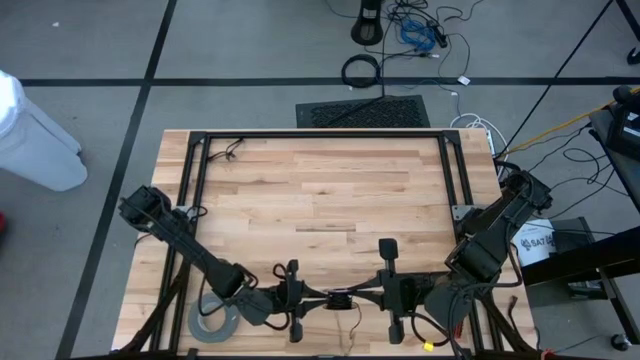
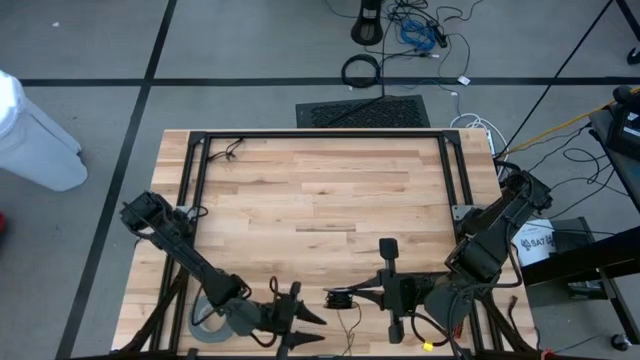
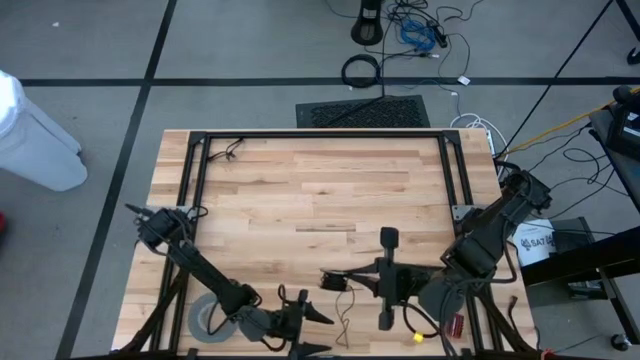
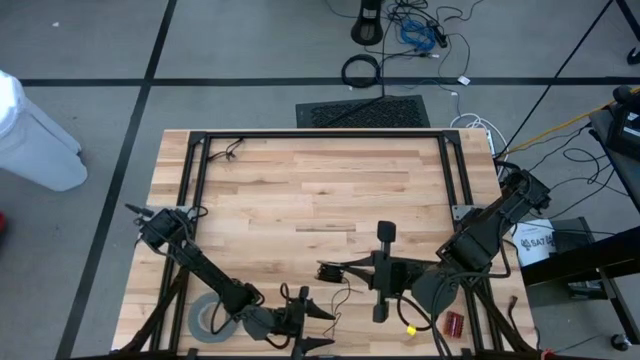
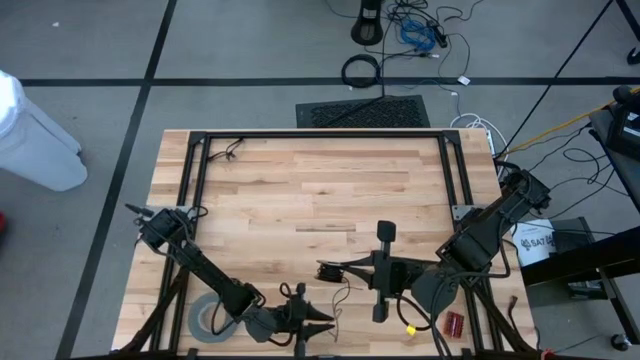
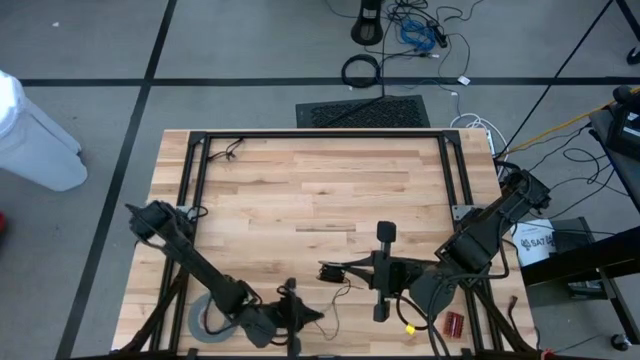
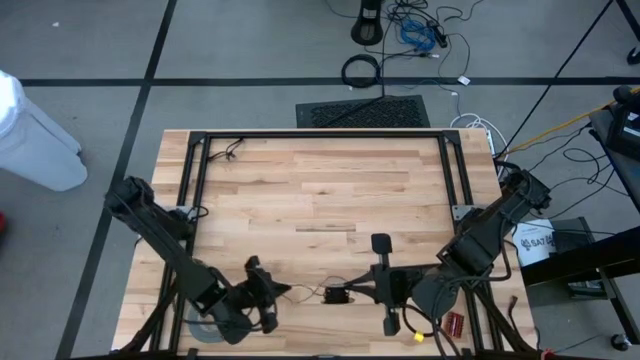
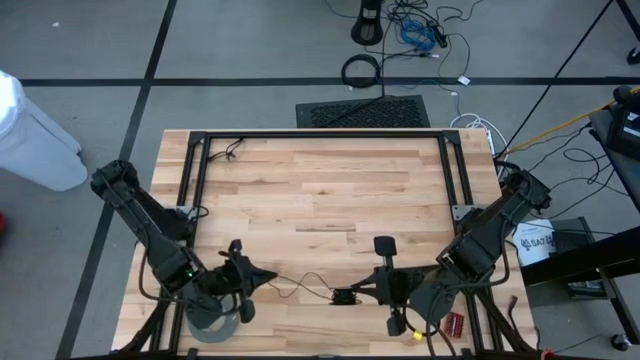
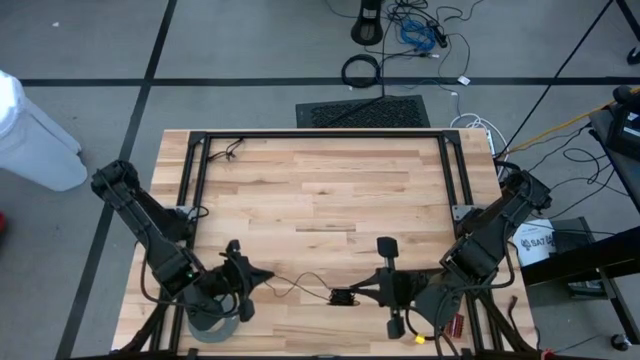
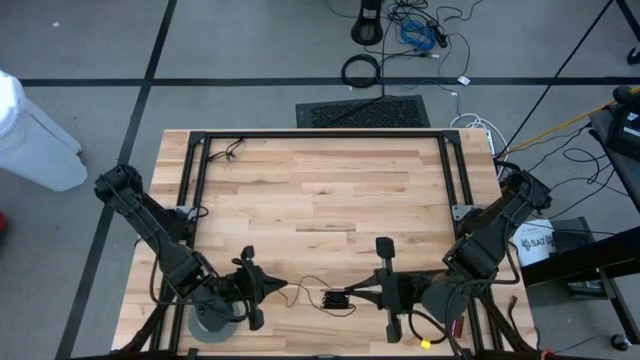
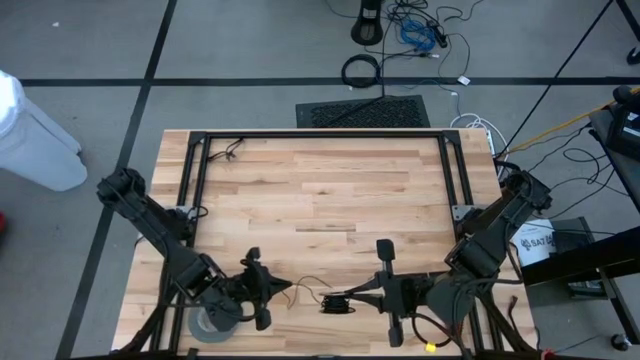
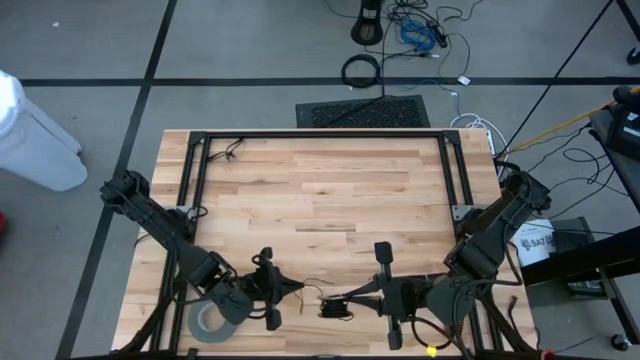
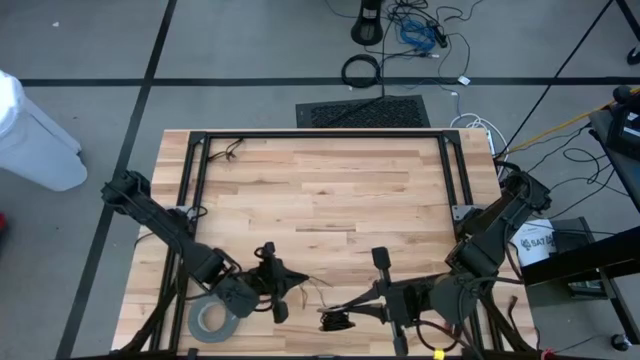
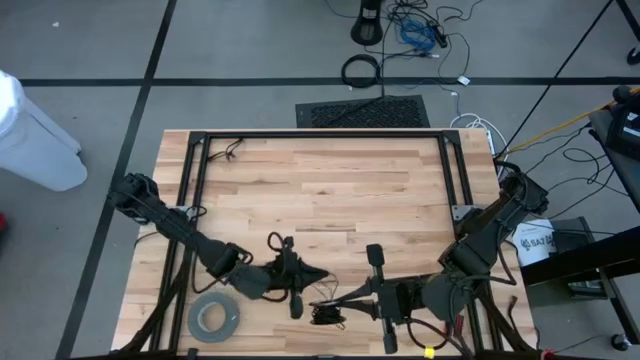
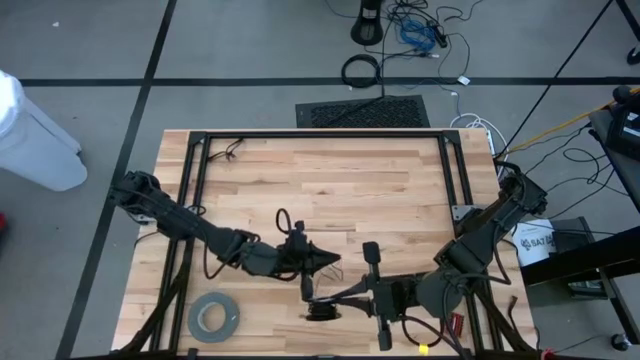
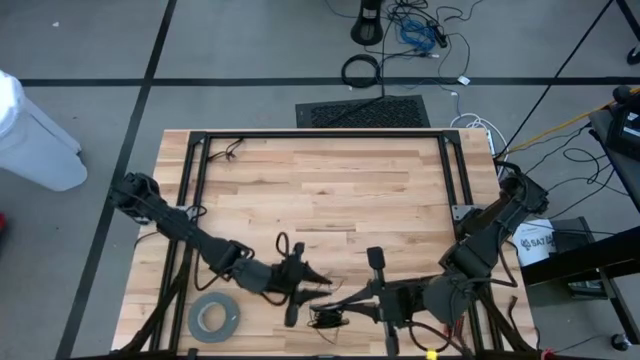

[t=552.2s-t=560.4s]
Task: Coil cords
Coil the black wire onto the spool

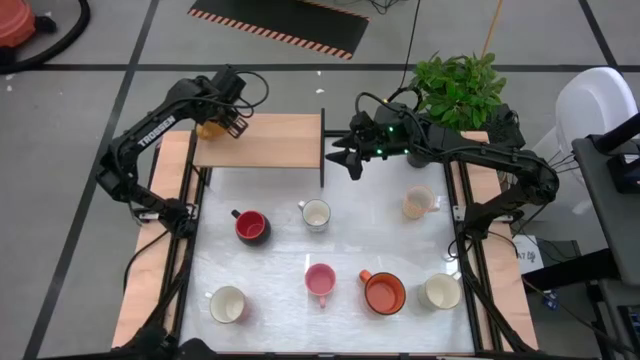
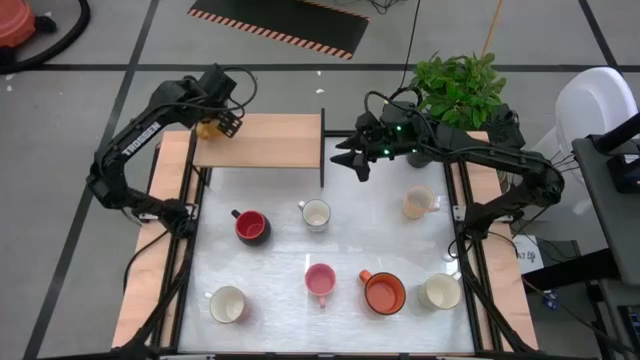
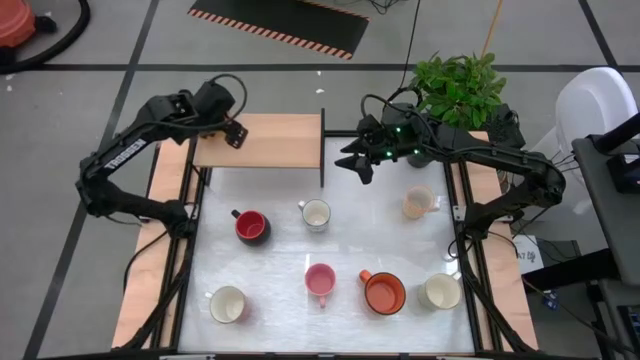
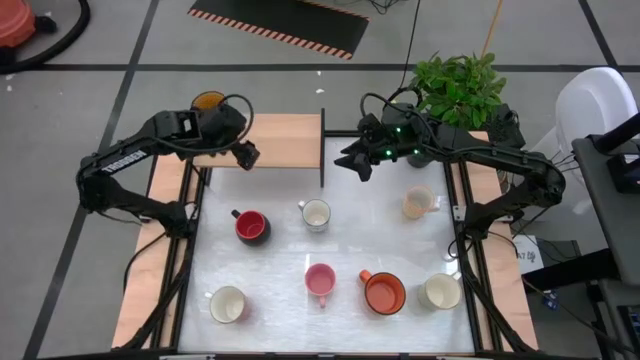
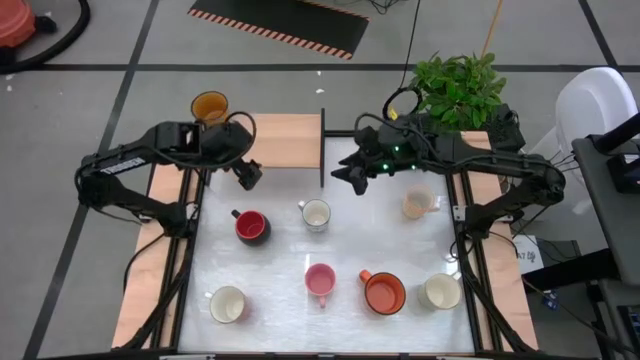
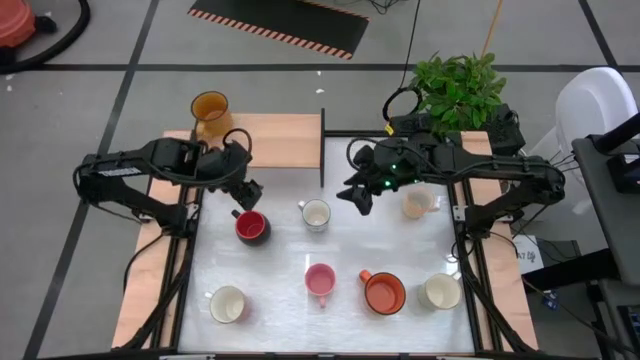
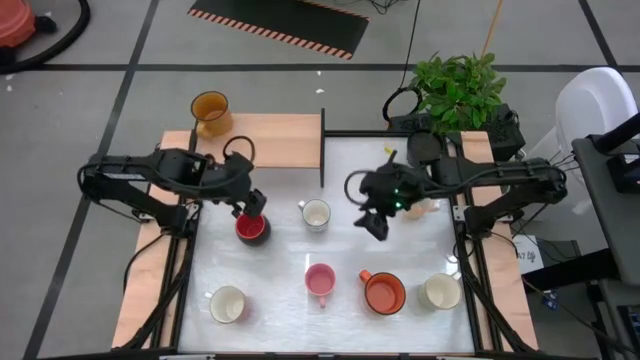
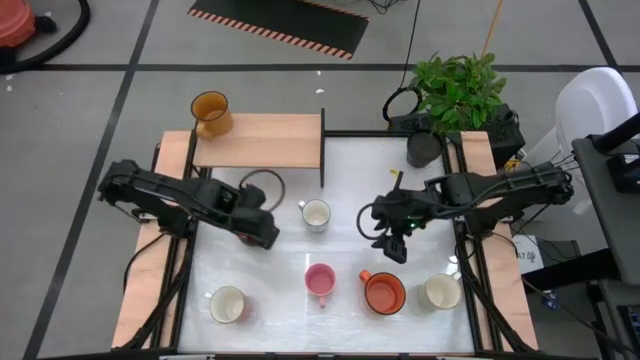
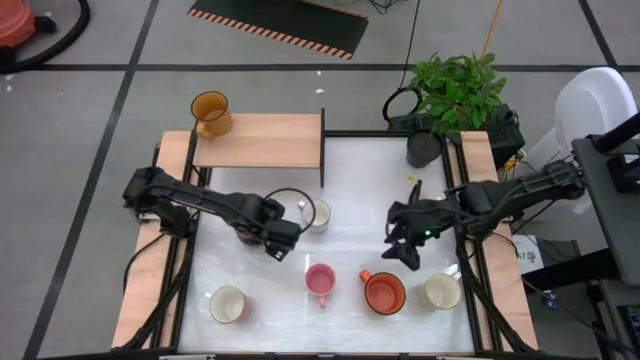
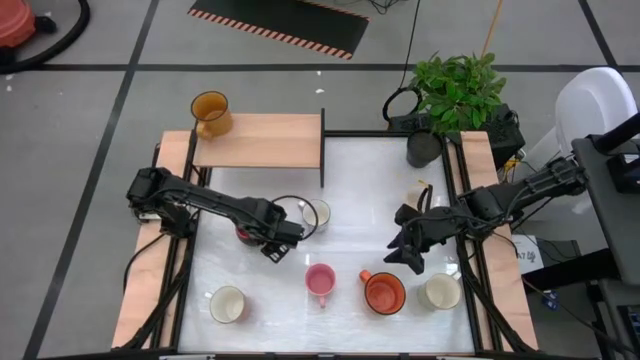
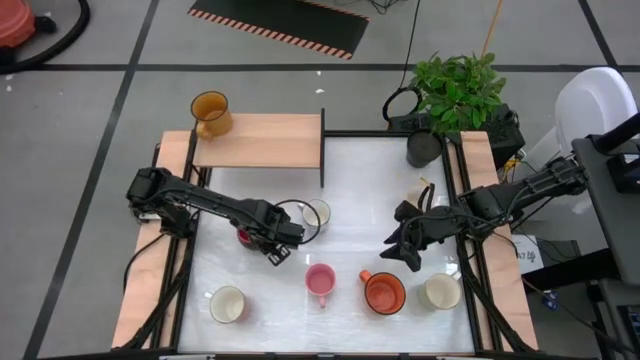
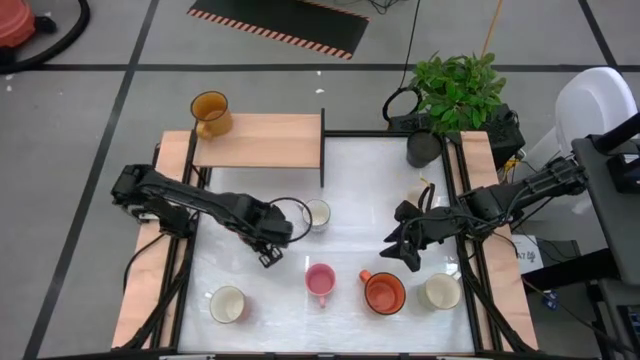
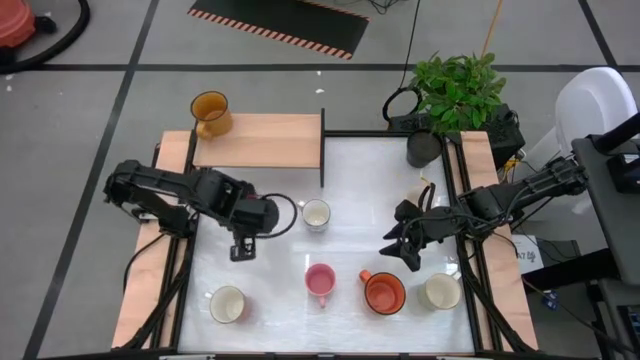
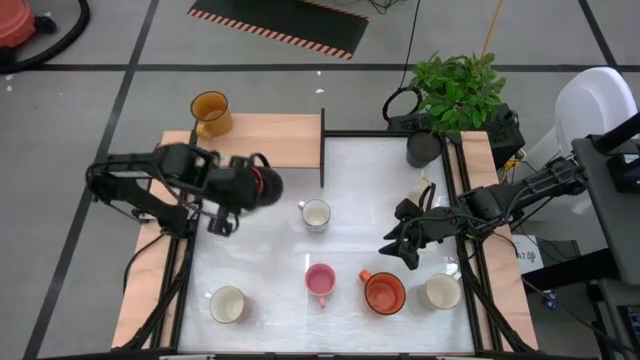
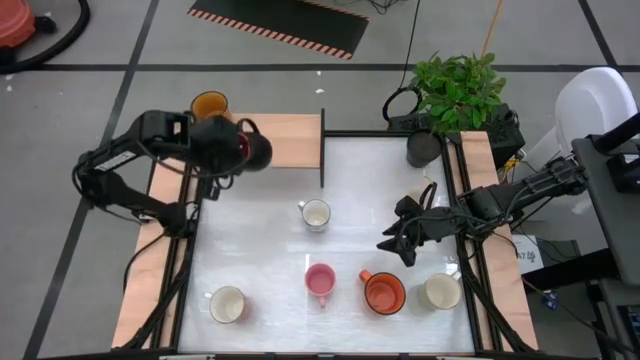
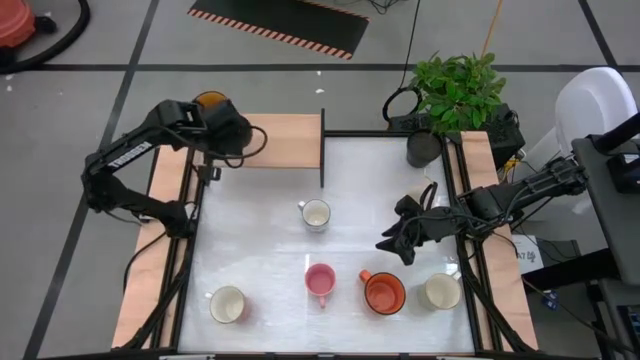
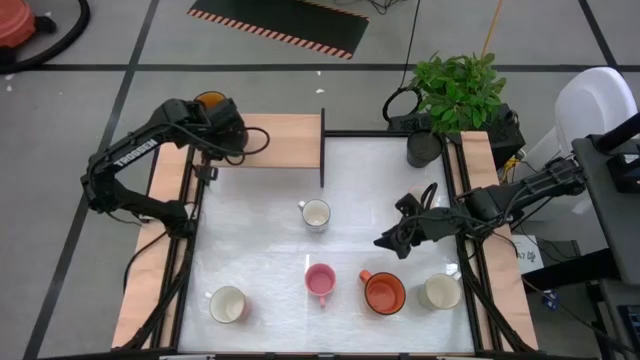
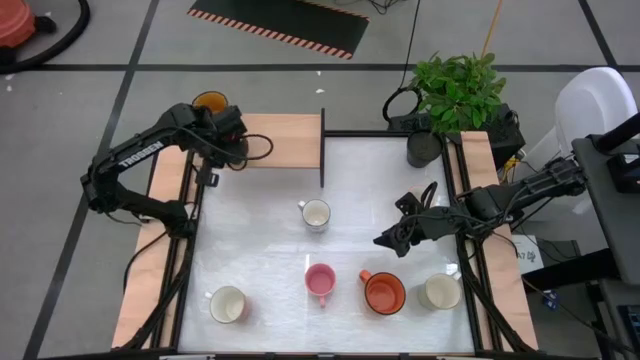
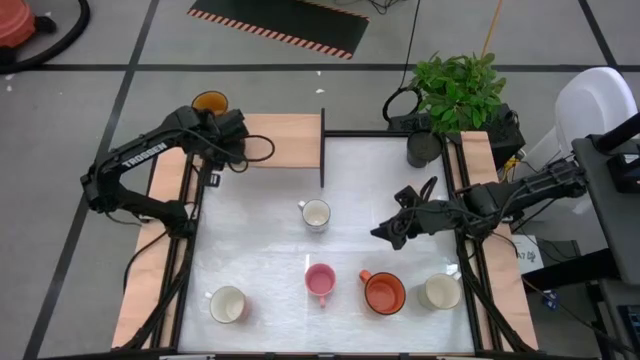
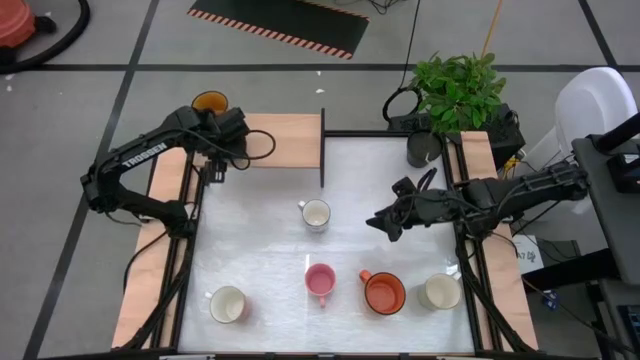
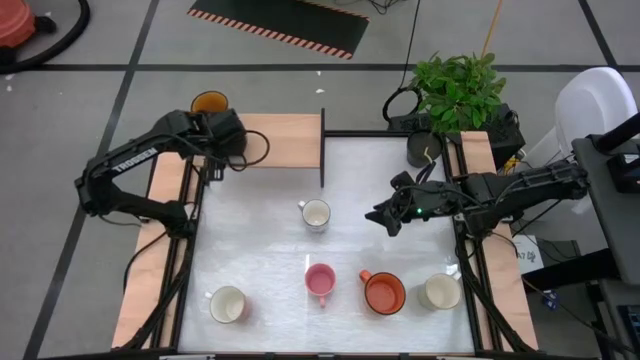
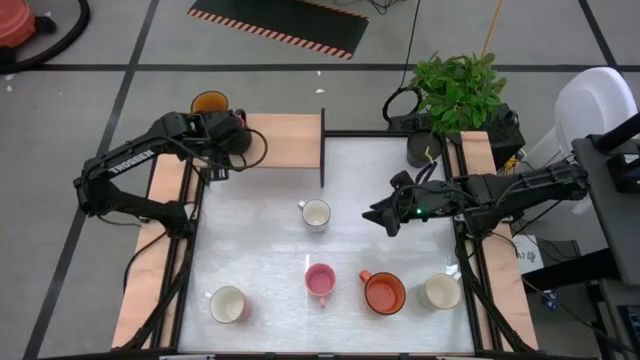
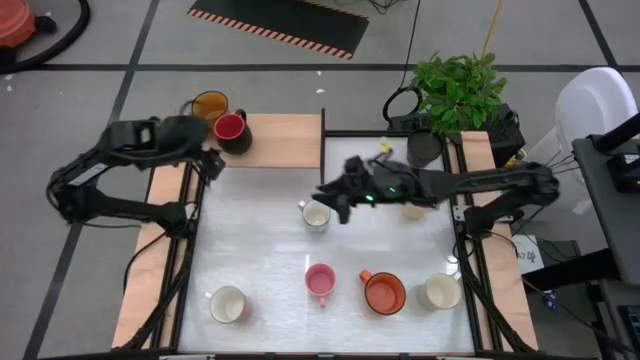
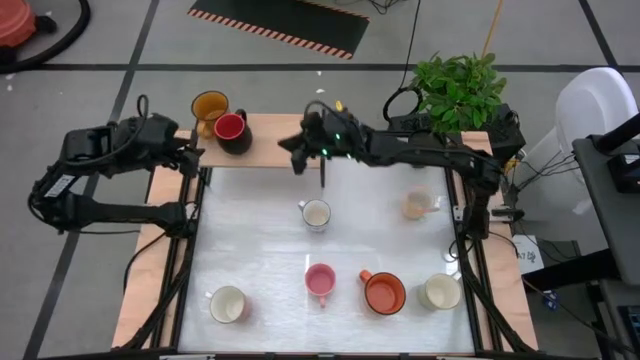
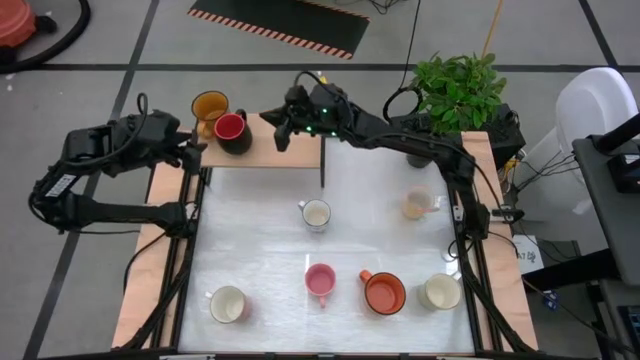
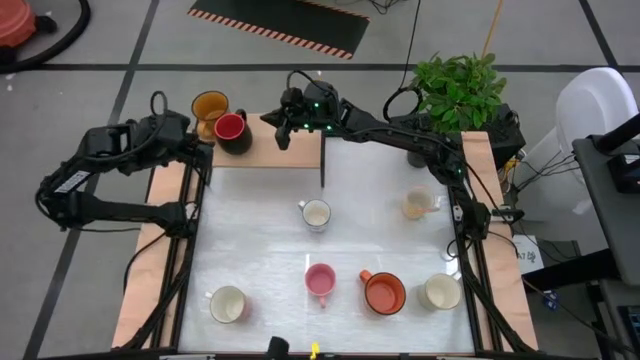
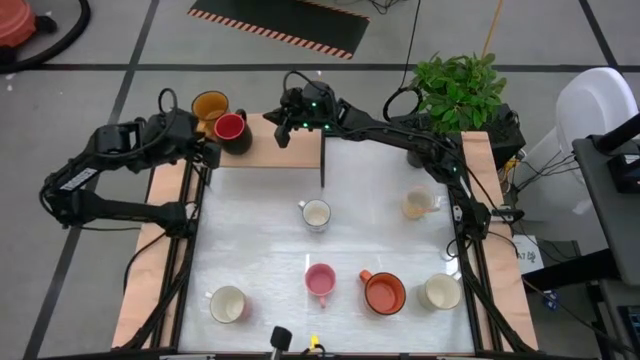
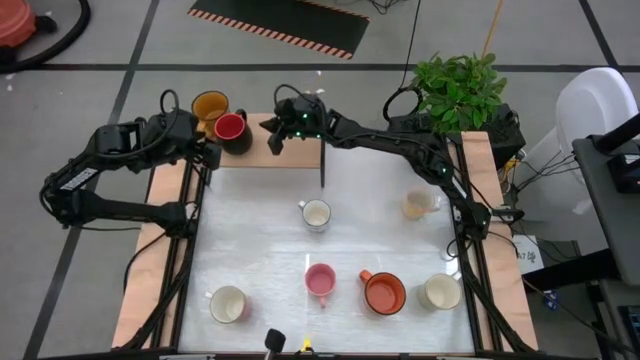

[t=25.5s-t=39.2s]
Task: Place coffee mugs
Put the black mug on the shelf
